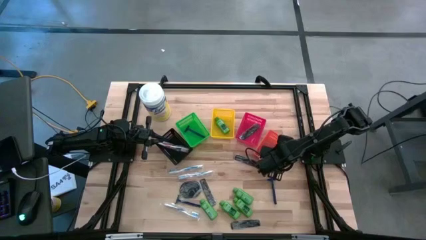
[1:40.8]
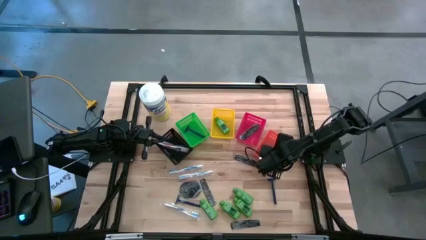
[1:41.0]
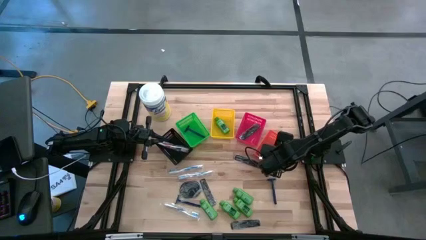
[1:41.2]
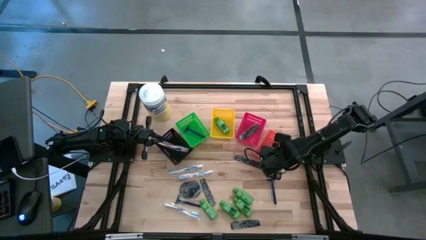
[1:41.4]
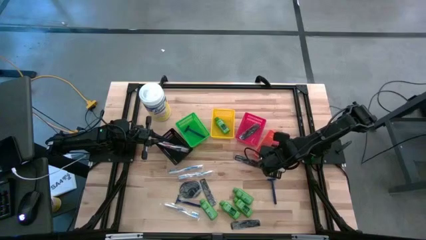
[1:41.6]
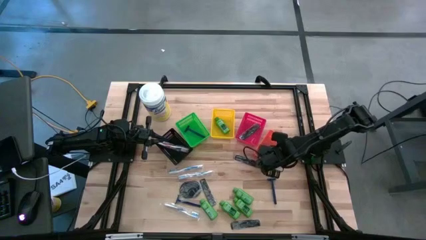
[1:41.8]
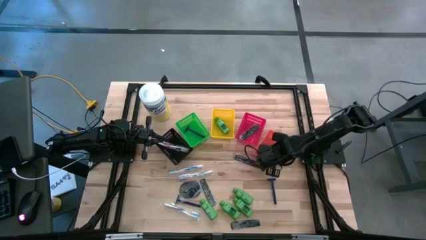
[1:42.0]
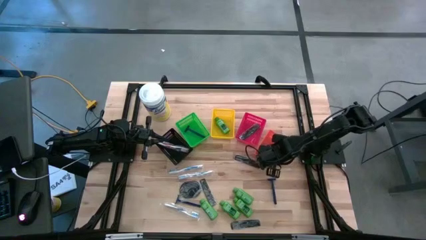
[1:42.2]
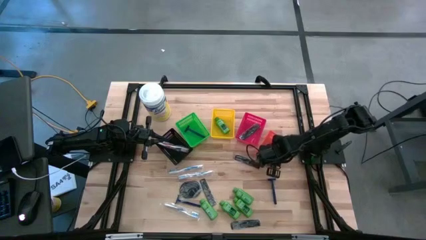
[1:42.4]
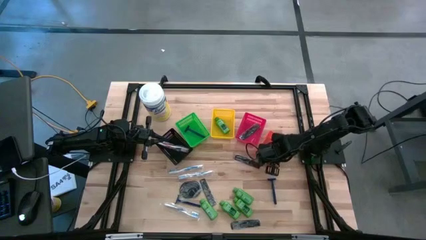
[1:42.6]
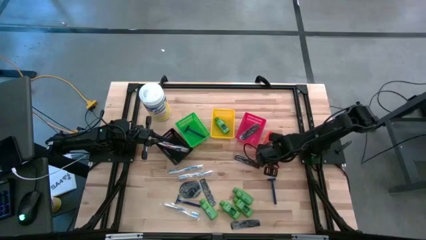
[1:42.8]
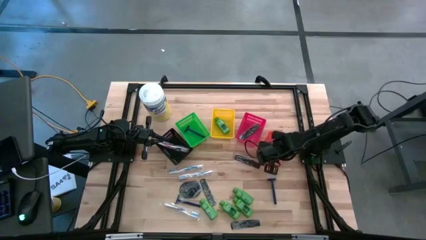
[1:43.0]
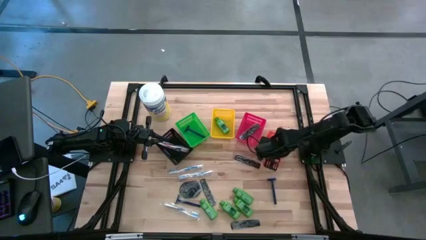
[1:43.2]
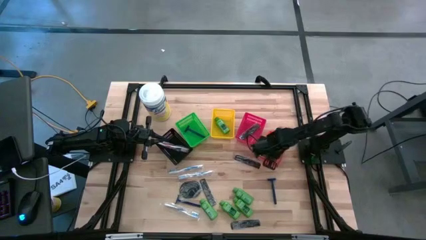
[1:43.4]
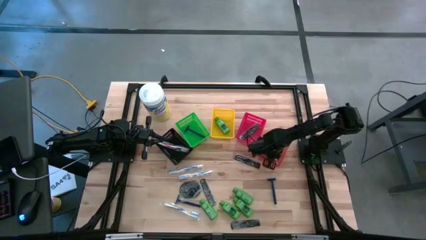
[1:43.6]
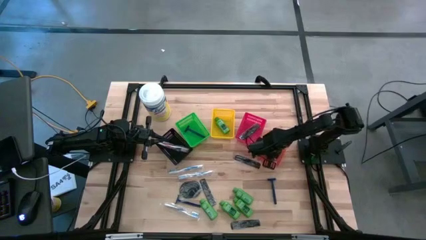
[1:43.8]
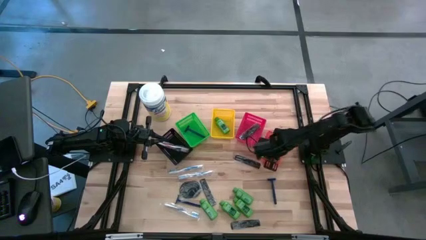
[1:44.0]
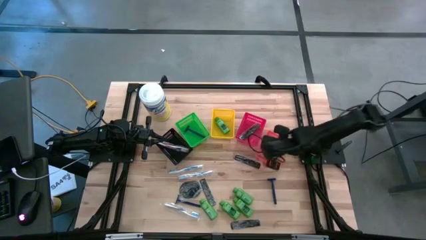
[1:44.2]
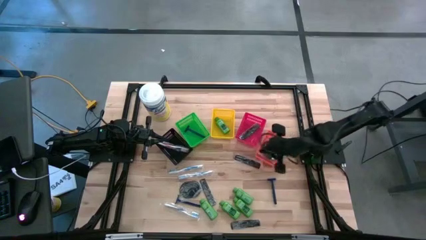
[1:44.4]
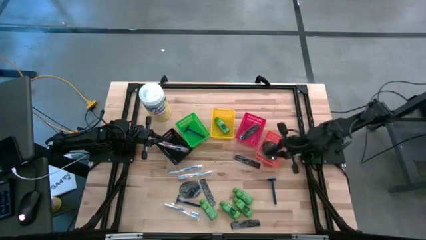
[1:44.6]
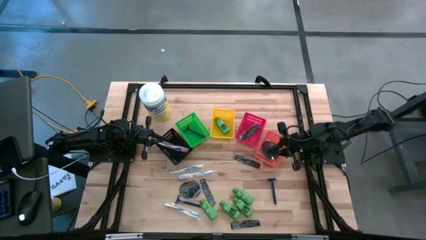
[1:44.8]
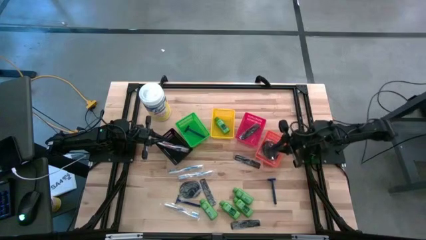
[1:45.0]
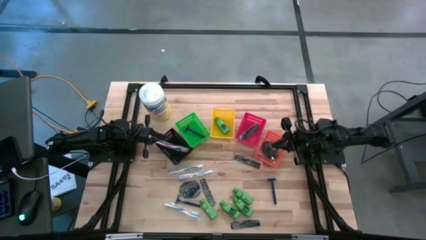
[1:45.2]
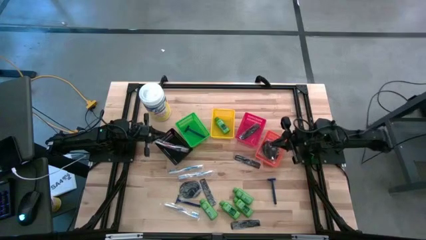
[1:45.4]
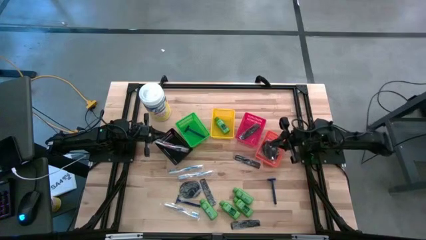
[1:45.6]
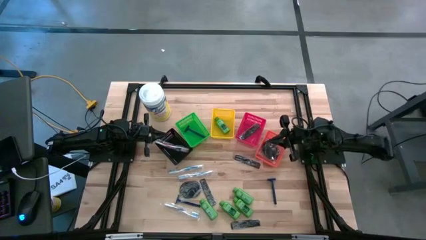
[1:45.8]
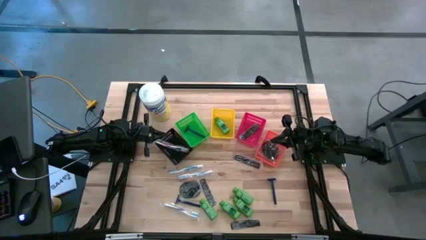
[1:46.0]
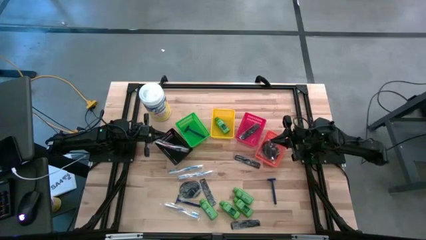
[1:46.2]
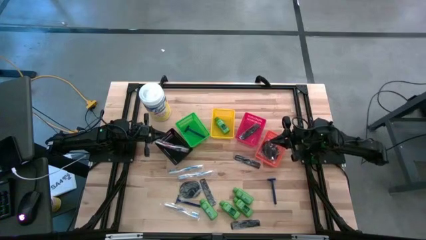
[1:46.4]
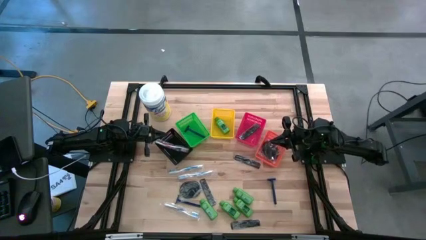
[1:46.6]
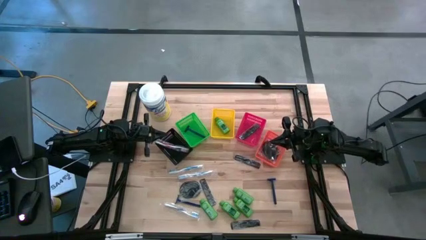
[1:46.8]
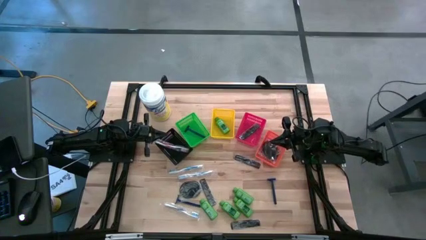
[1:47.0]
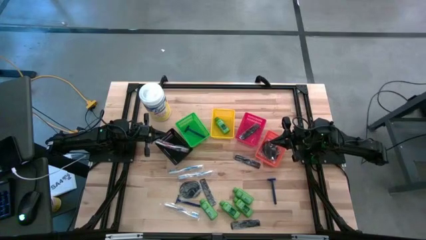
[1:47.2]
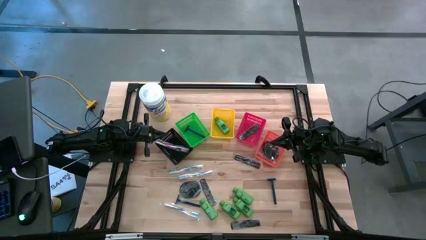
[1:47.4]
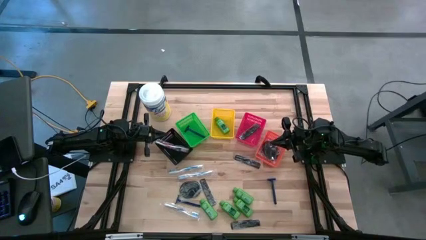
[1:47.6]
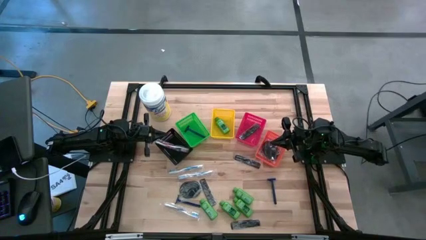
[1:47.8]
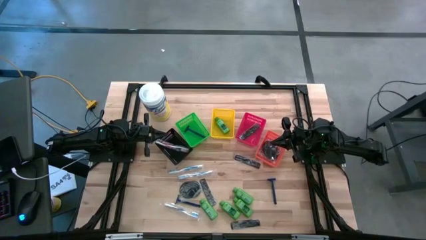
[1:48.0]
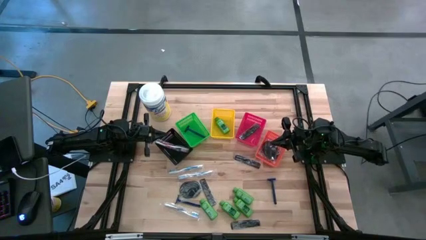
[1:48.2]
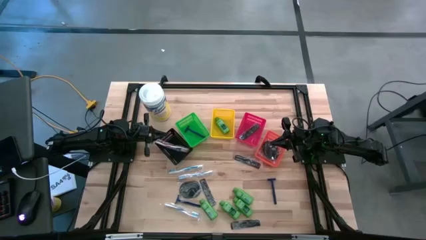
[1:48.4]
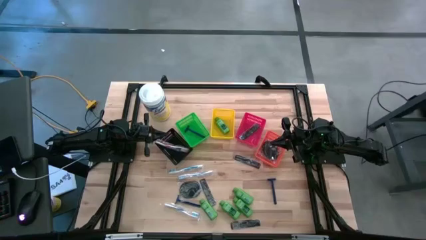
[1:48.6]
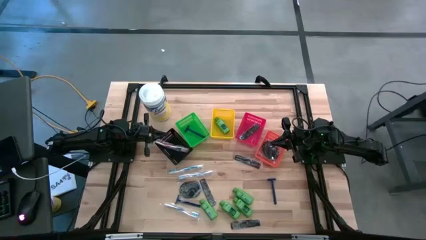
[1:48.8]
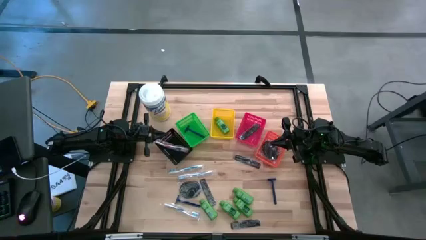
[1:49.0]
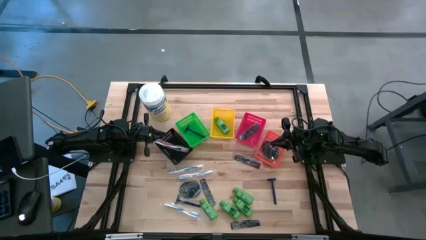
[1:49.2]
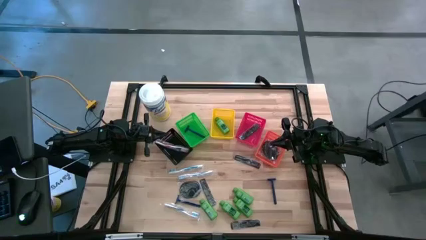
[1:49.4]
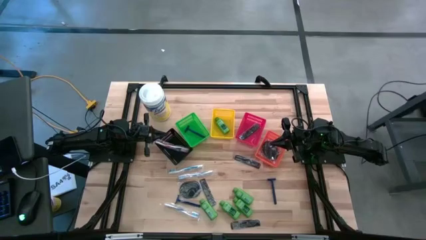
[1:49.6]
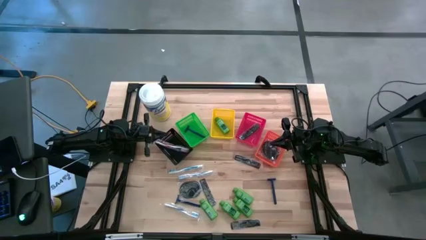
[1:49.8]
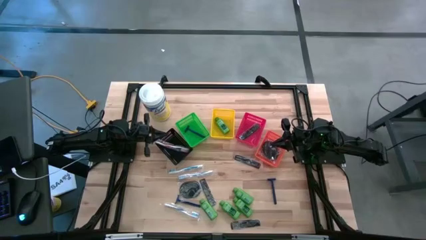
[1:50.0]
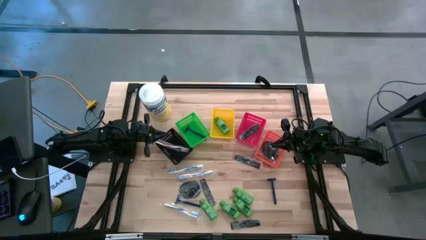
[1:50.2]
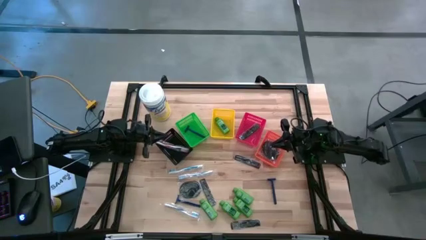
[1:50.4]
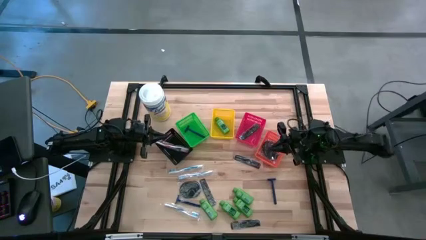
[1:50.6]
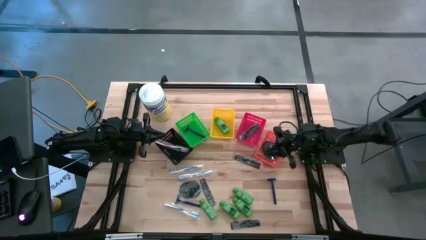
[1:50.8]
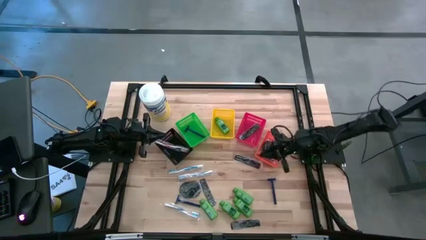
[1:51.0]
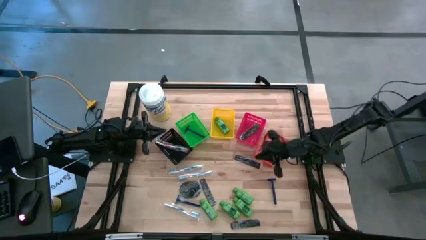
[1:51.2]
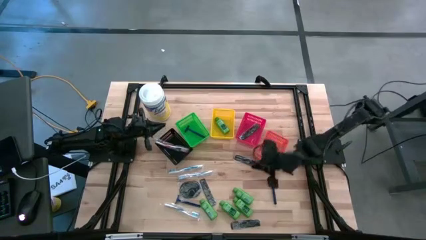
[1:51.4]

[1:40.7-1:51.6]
Task: Pick & Place Travel size toiletries
Put the right green bottle shampoo into the yellow bin

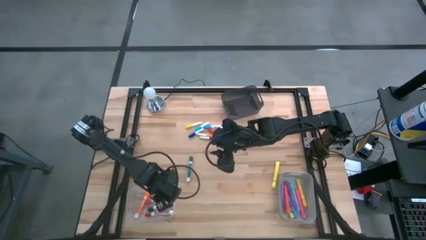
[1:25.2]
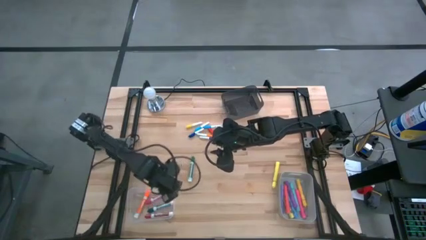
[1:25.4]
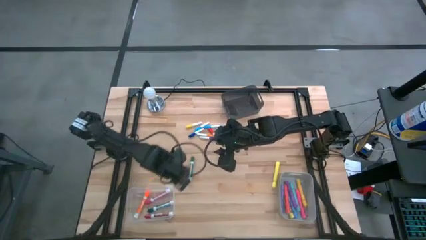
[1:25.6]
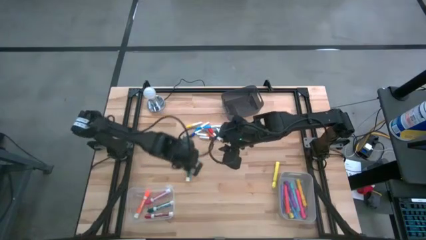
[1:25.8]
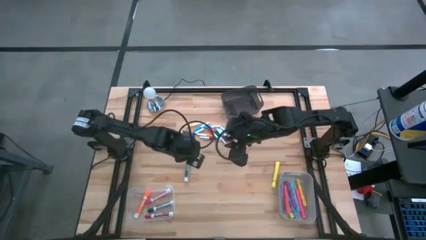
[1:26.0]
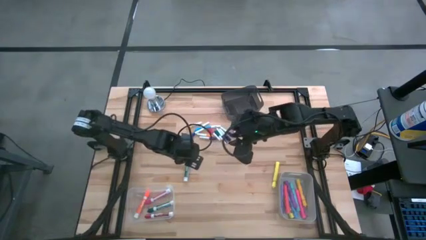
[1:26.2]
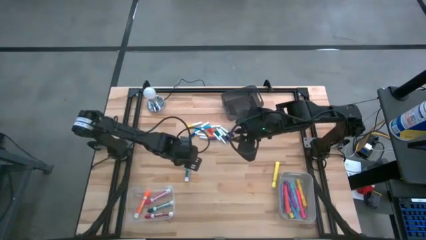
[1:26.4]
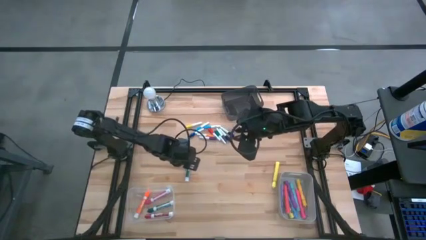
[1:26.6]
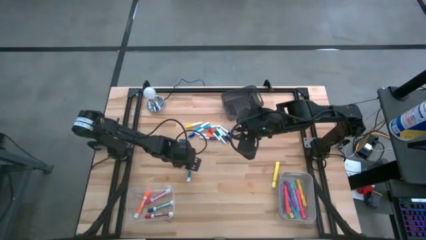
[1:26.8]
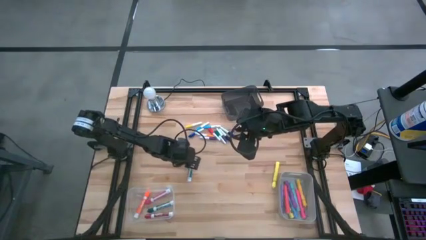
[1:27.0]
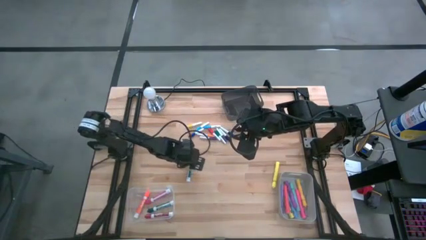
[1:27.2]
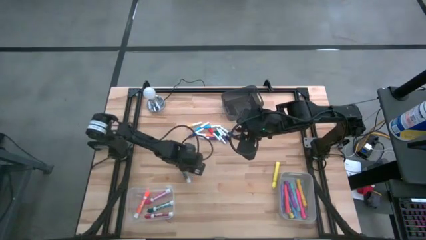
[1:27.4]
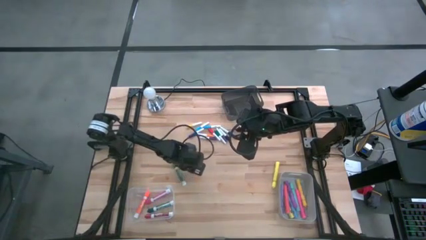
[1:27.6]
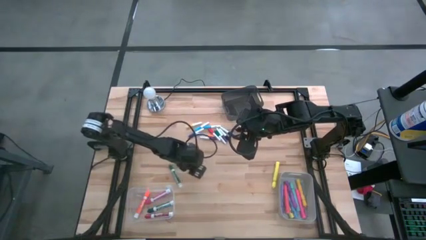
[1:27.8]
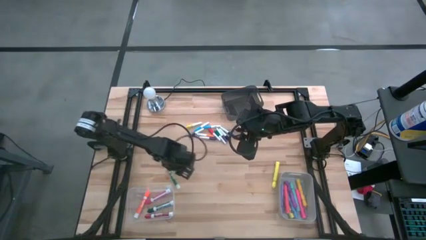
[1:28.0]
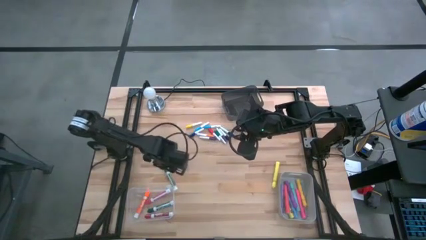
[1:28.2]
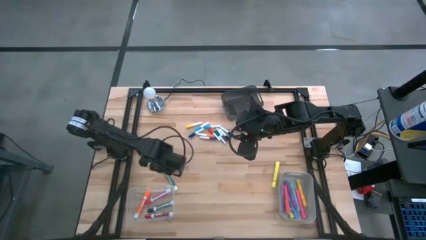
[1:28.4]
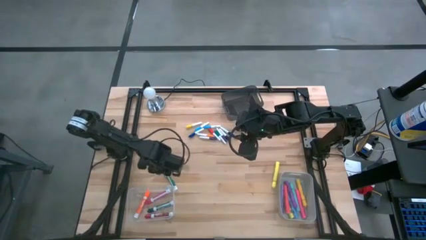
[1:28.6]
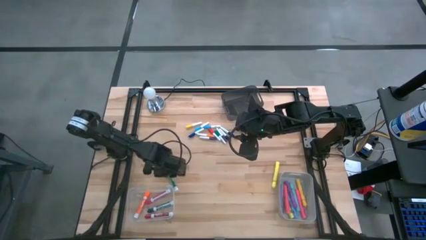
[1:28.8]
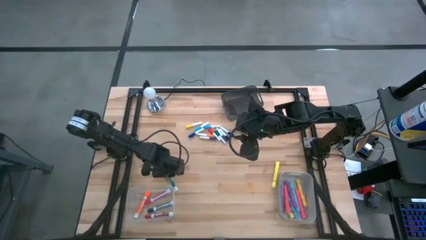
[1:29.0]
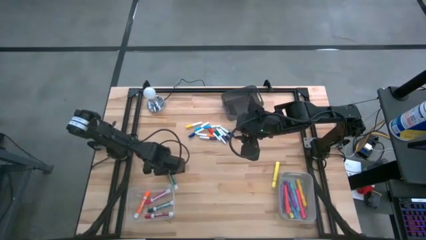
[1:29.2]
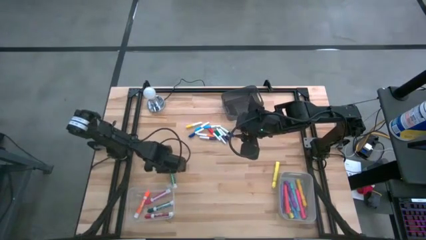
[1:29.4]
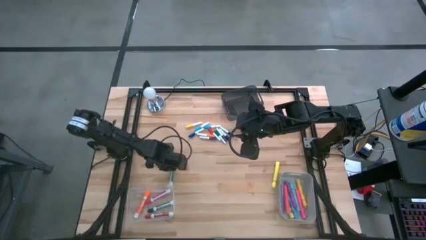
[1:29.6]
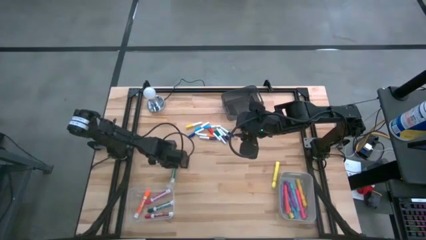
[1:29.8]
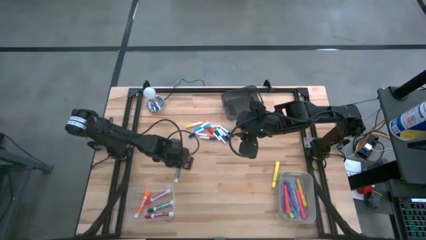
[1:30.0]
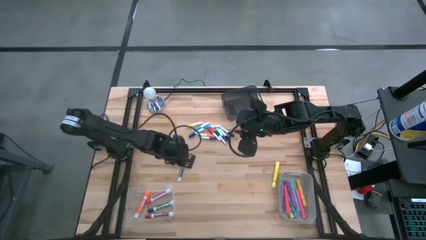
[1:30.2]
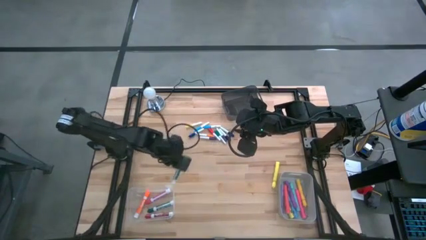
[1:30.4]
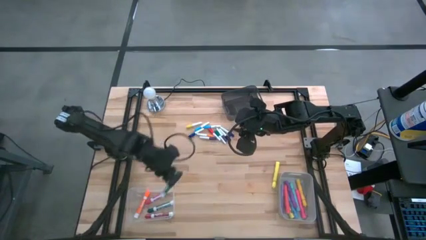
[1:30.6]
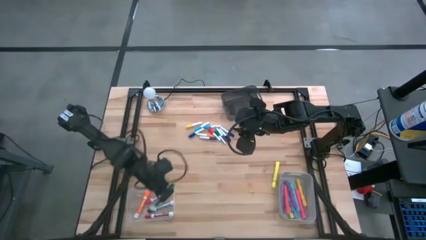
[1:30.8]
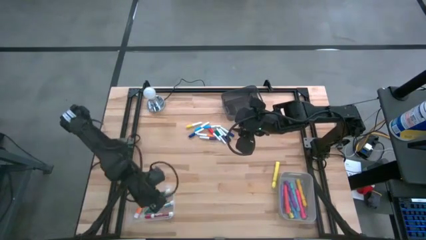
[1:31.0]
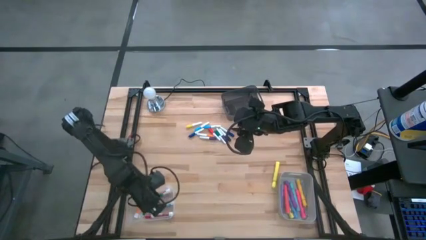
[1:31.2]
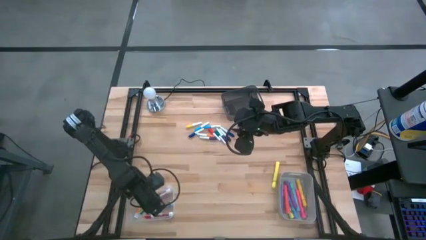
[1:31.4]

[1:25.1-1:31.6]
Task: Pick & Place Markers
Put the green marker pen into the transparent bin
